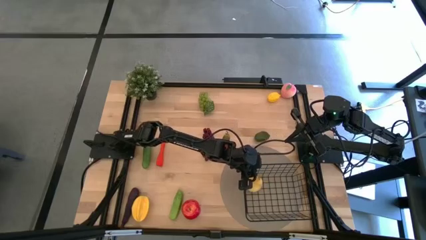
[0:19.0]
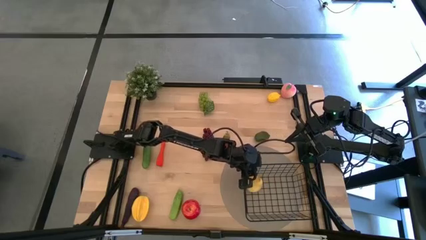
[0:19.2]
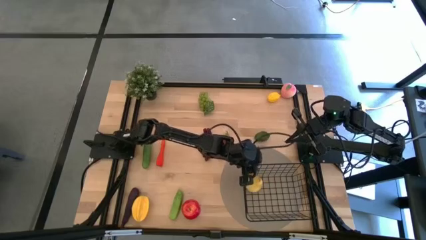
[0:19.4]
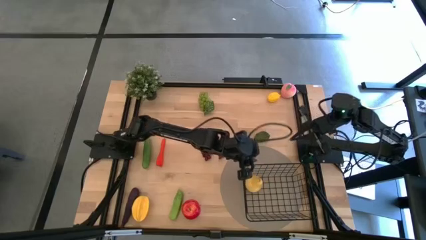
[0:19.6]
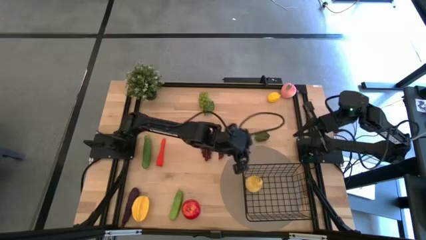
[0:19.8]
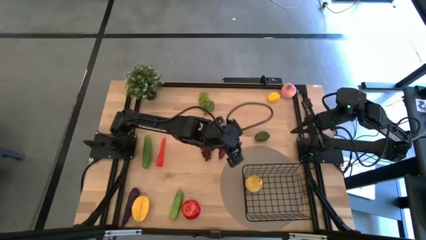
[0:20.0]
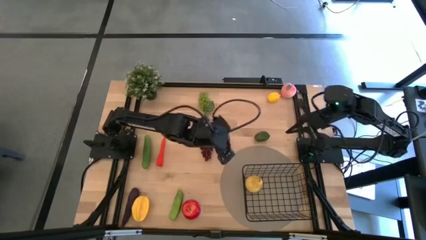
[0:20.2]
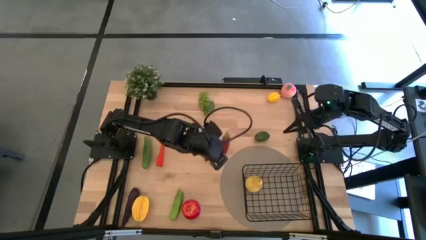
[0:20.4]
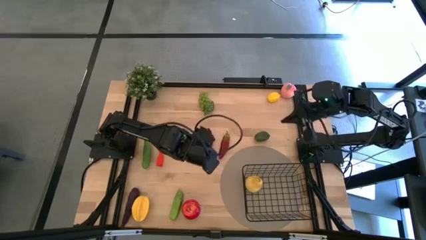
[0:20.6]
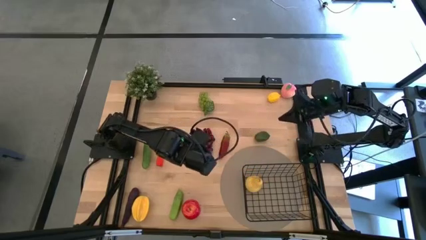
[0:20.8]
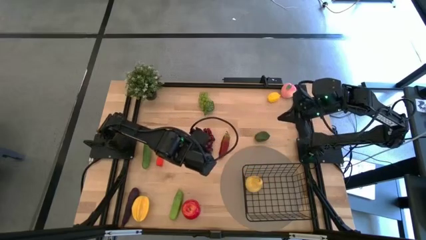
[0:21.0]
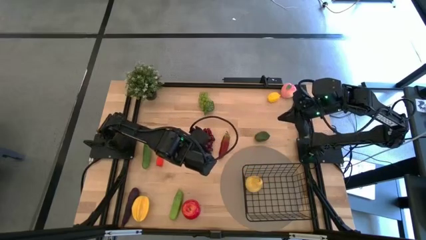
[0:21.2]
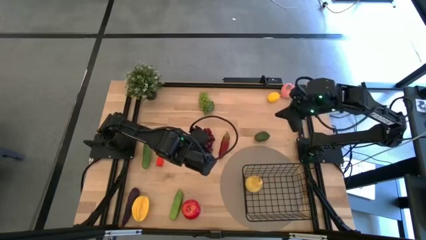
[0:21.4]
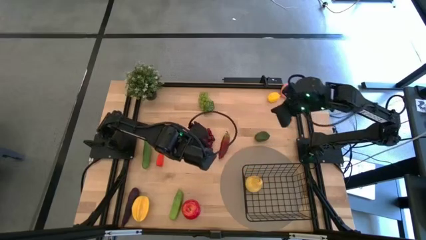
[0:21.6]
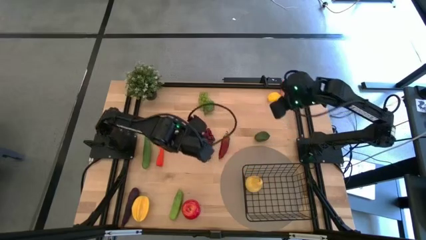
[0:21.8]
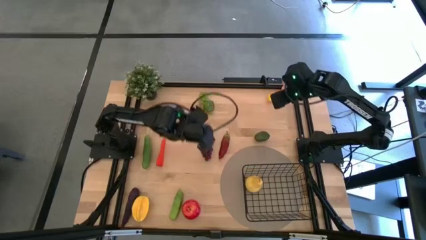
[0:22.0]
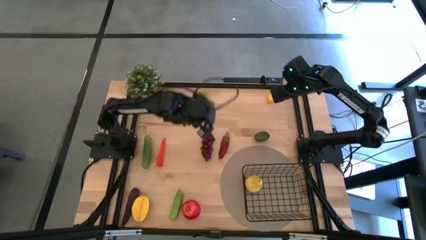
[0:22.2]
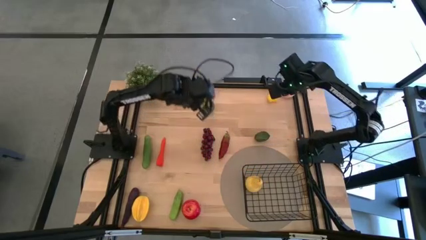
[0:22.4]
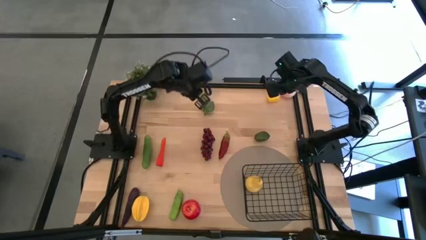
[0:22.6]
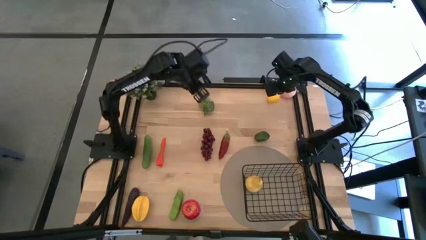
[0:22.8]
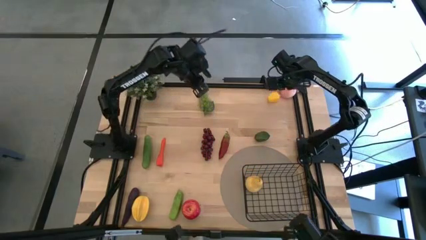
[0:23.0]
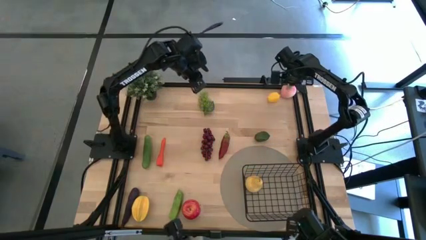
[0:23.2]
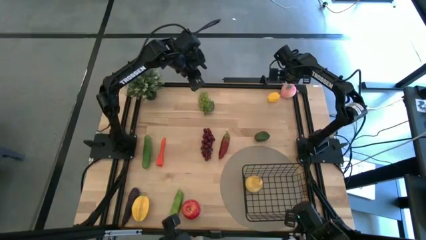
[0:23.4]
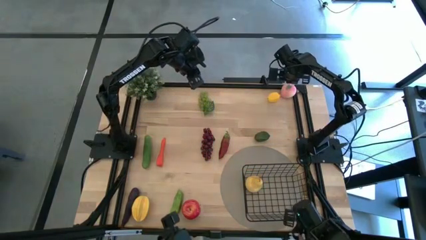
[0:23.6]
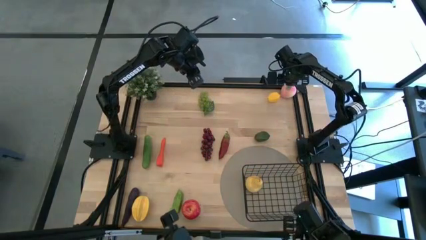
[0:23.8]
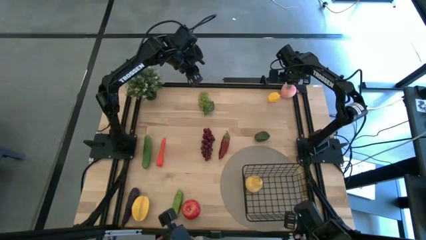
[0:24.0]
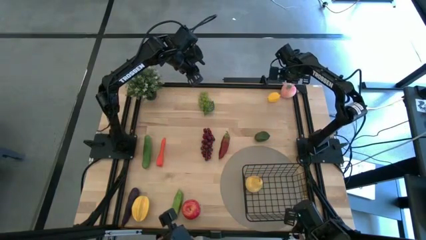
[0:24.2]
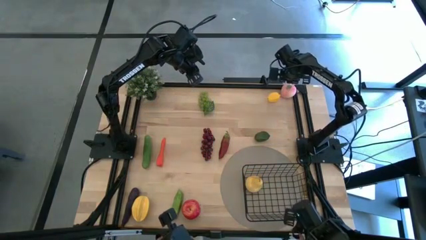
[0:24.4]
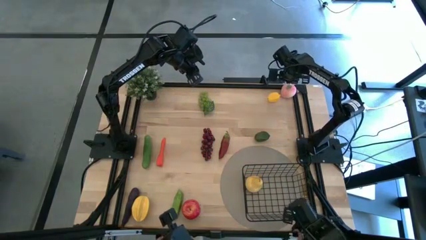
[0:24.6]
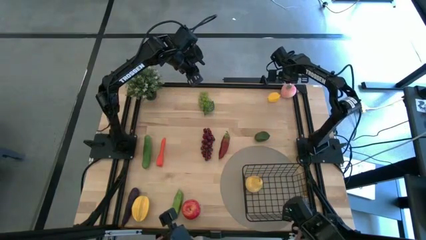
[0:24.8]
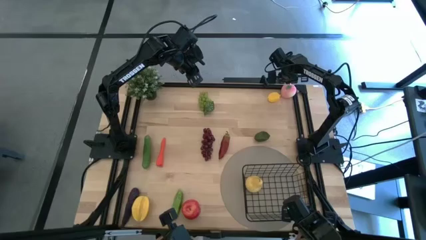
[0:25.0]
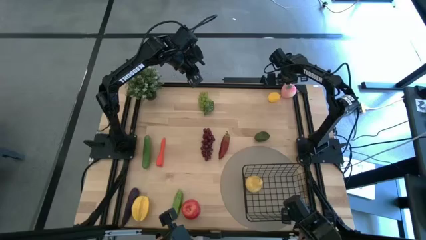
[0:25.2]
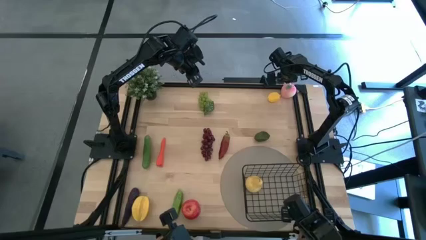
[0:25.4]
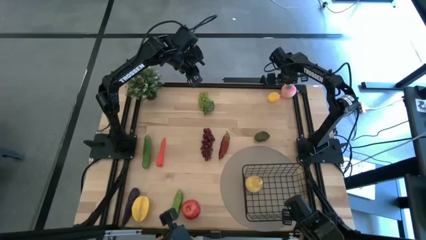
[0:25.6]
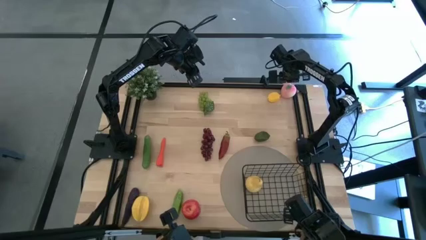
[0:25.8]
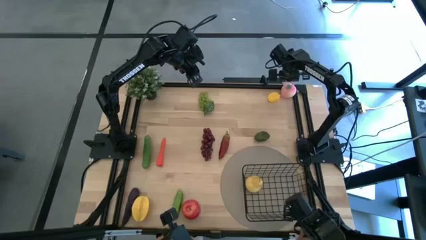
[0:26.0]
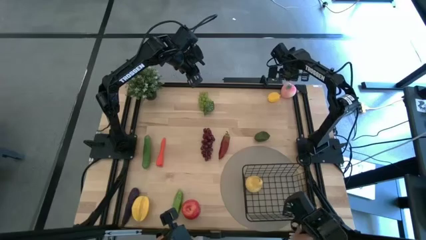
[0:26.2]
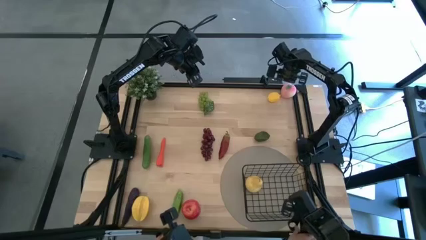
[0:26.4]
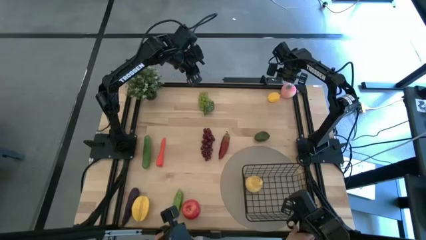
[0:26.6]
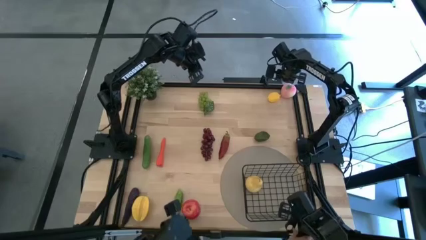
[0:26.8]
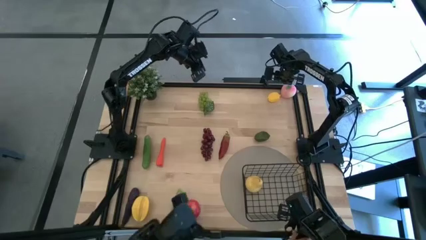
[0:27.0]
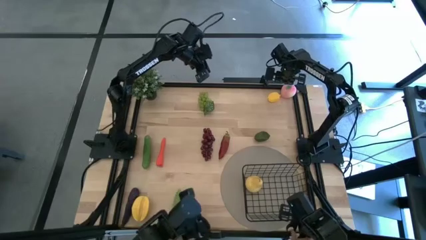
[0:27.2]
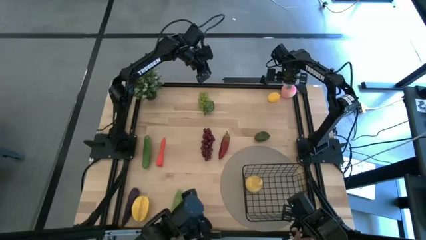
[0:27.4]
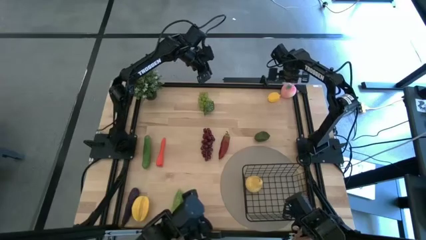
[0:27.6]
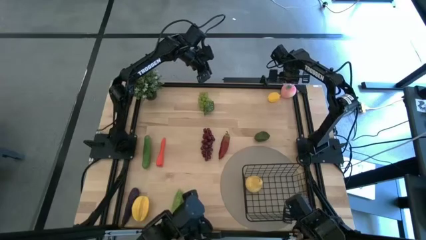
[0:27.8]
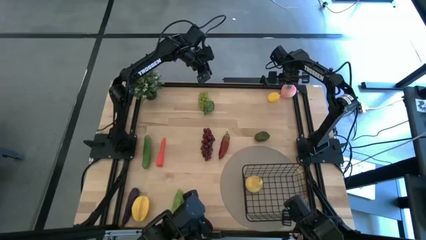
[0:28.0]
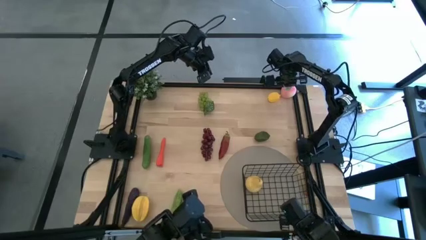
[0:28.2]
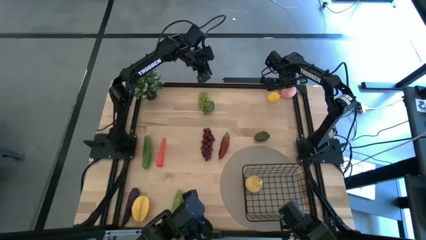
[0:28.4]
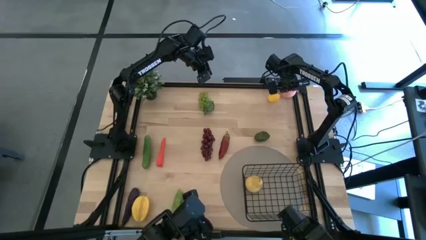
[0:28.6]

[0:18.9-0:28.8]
Task: Build produce basket
Put the peach into the wire basket
